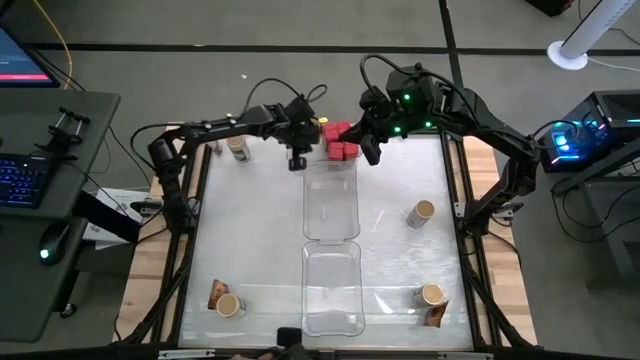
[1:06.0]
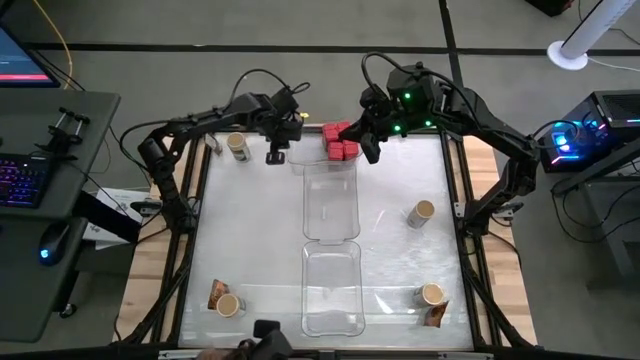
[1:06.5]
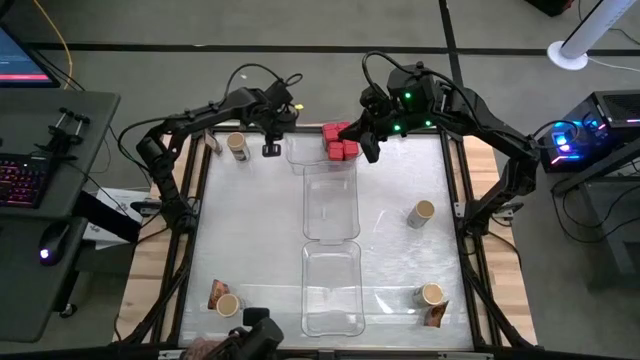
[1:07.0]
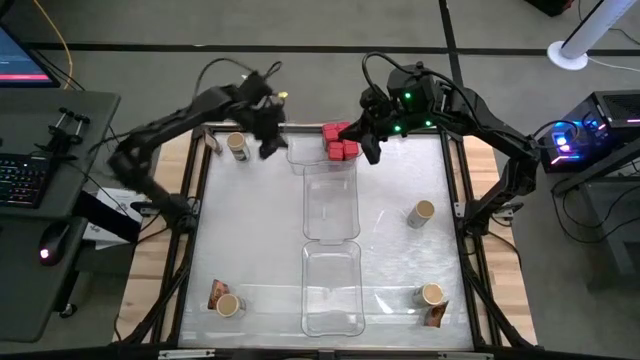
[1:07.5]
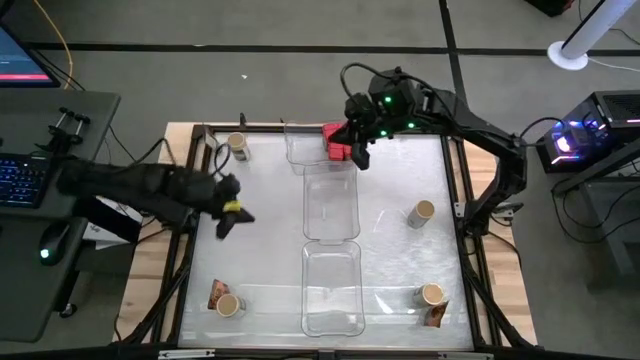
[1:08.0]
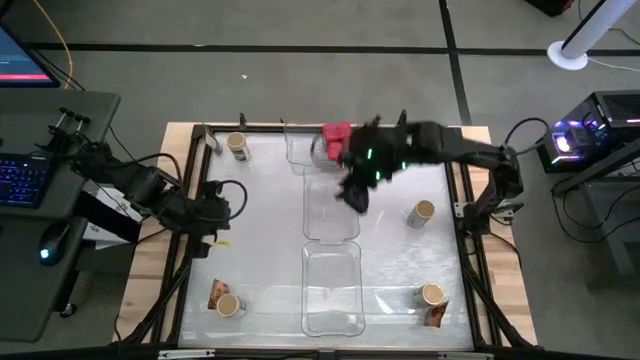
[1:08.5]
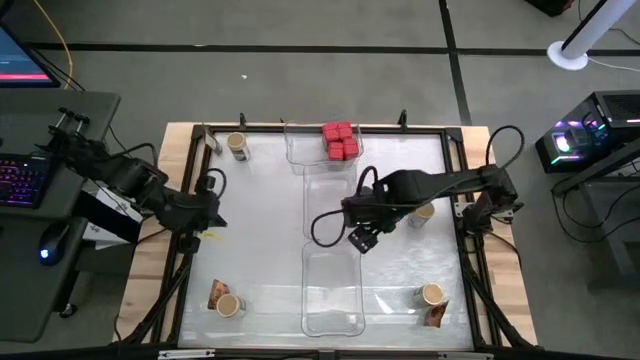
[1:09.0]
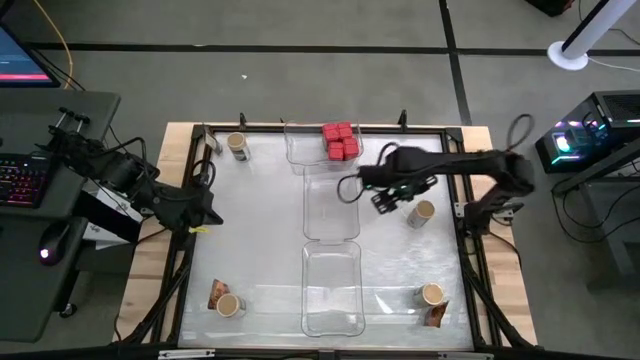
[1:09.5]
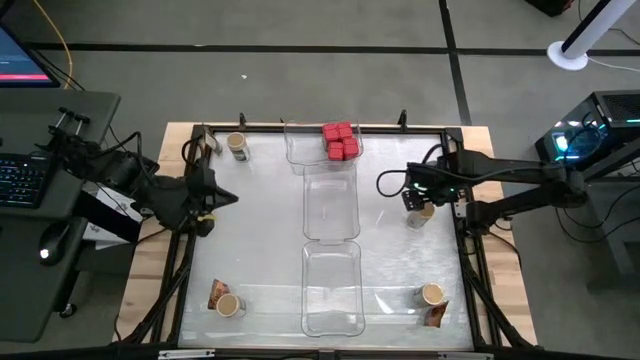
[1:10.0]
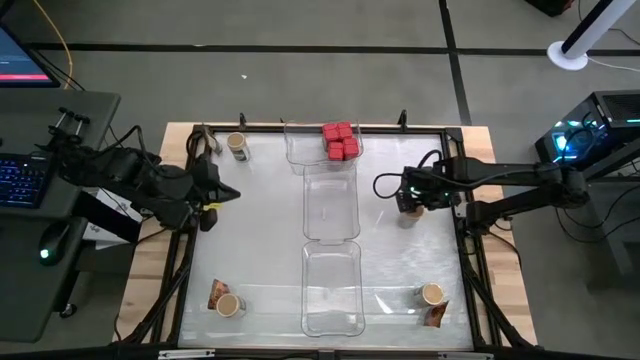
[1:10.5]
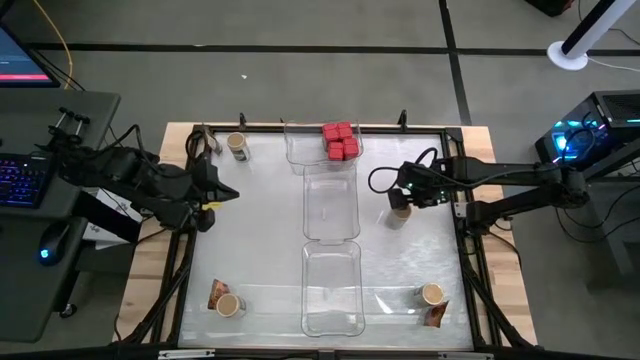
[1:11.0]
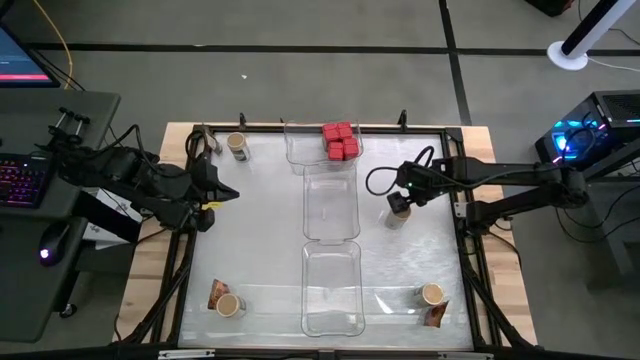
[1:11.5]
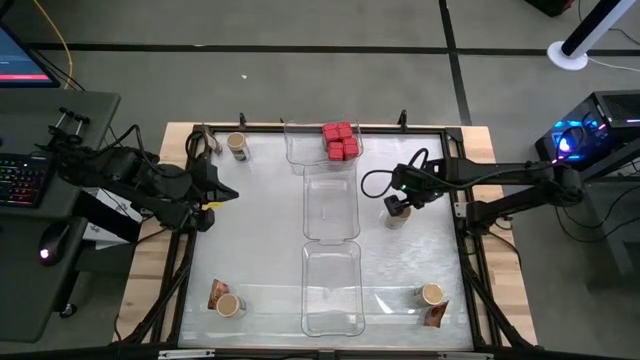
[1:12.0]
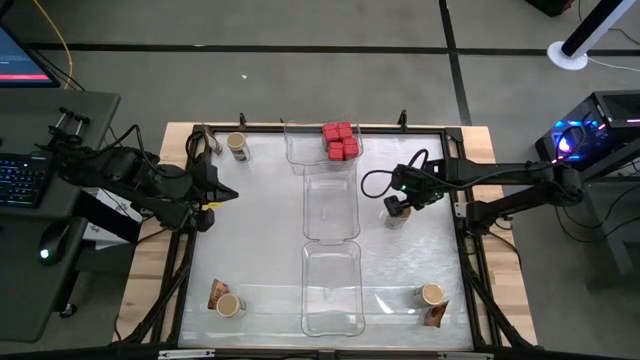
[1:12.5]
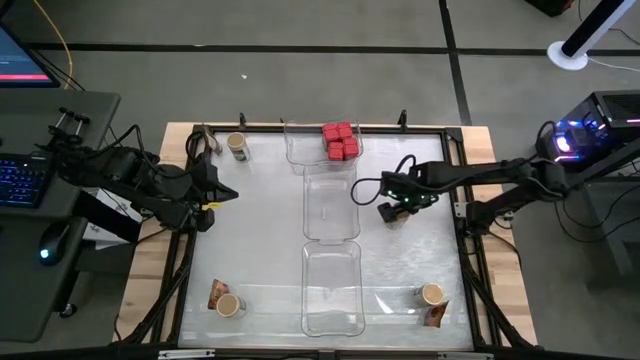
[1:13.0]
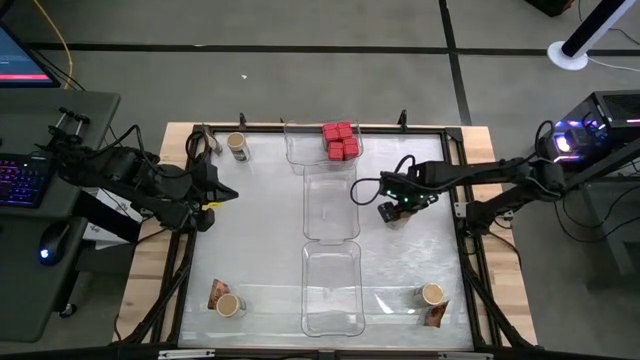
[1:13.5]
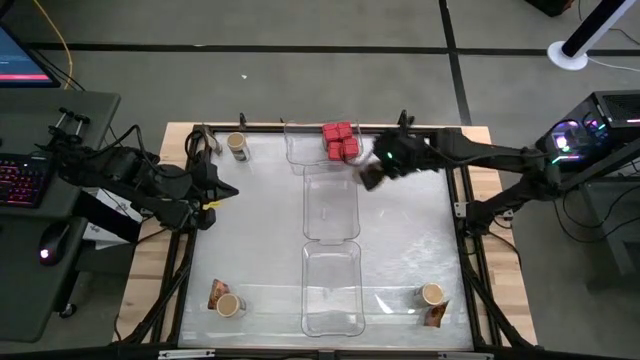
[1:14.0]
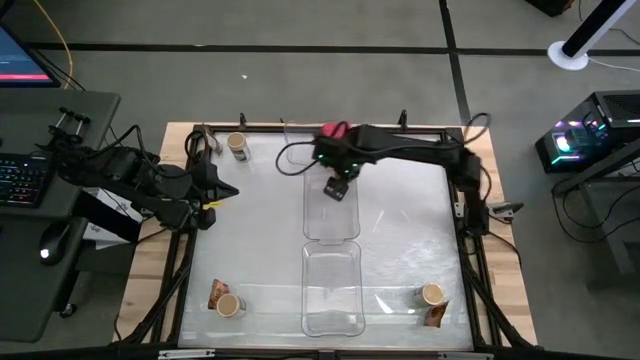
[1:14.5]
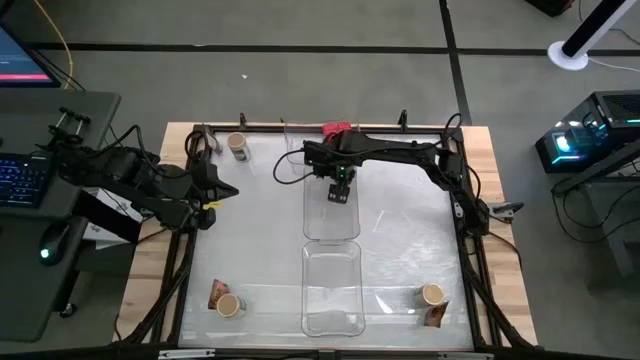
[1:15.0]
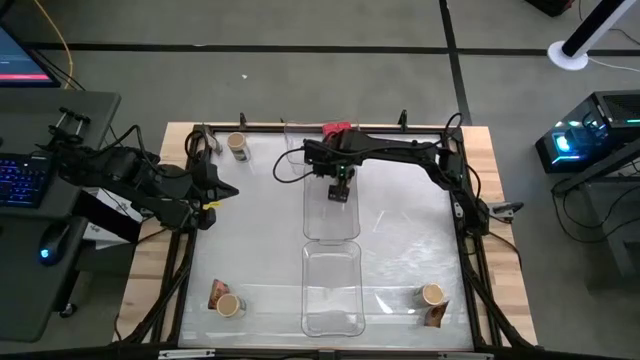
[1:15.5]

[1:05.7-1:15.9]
Task: Sort spices by type
Put the middle right gold seasoning bottle into the center transparent bin

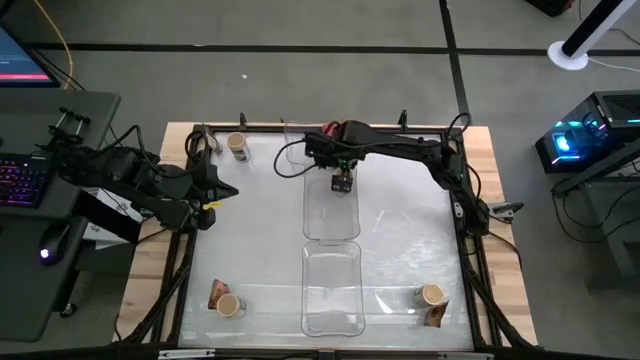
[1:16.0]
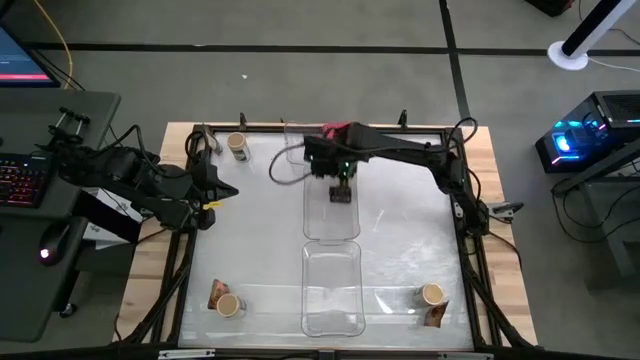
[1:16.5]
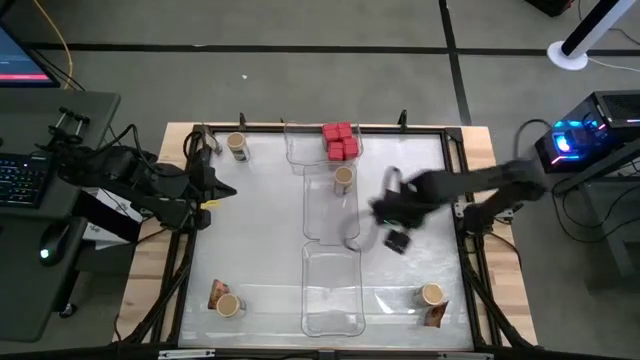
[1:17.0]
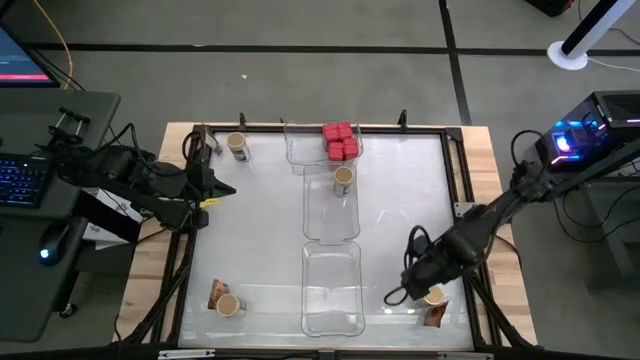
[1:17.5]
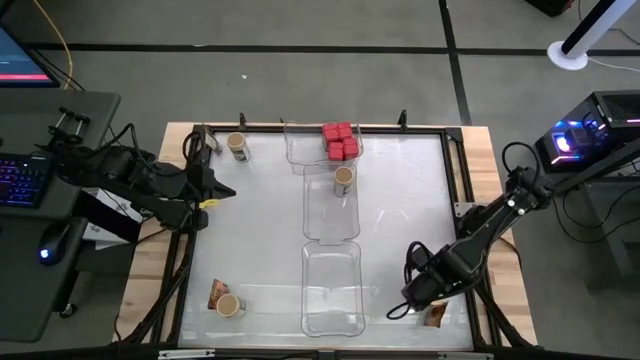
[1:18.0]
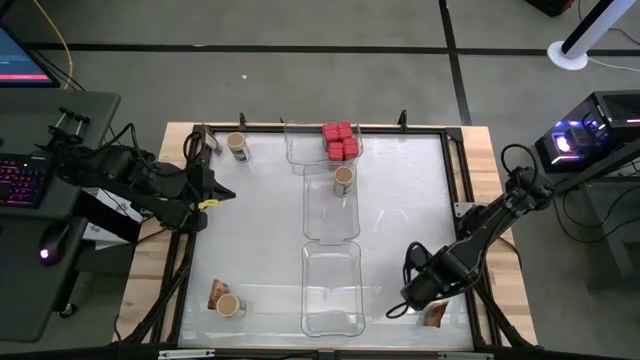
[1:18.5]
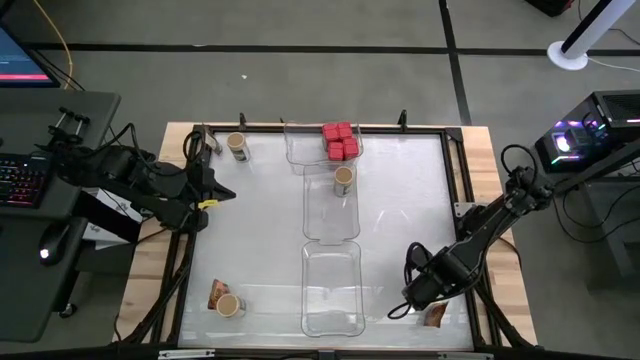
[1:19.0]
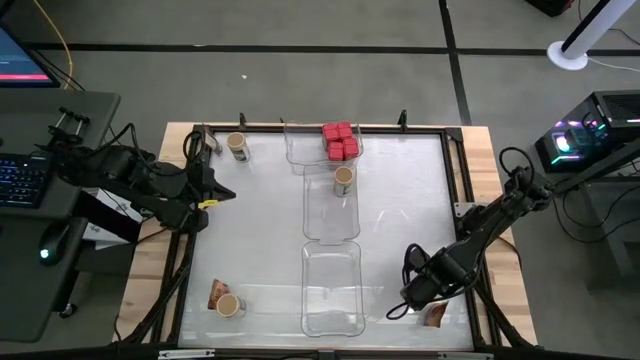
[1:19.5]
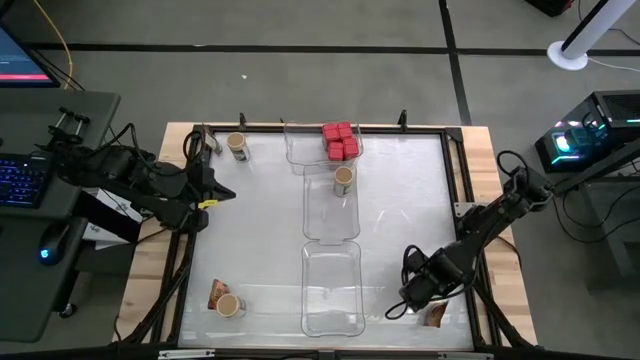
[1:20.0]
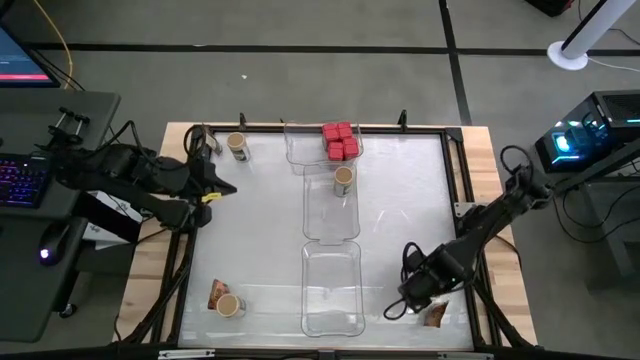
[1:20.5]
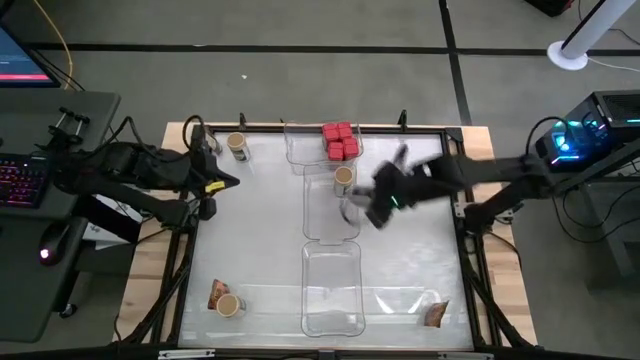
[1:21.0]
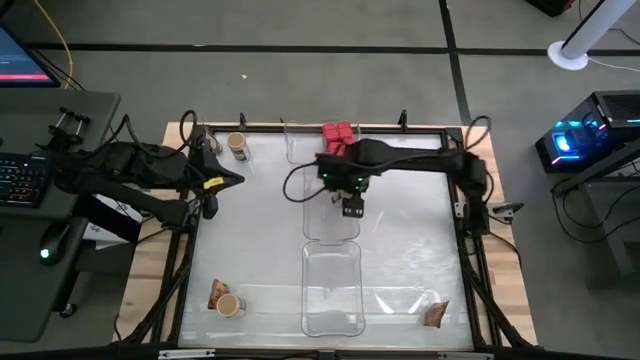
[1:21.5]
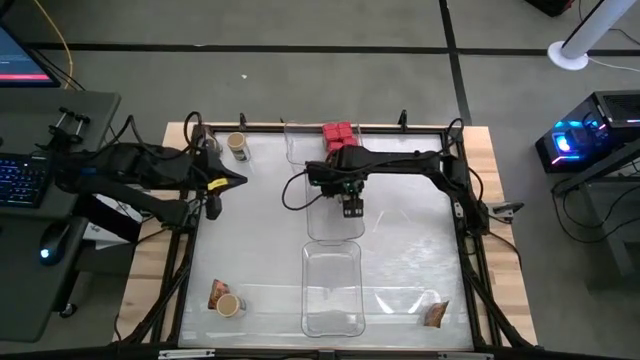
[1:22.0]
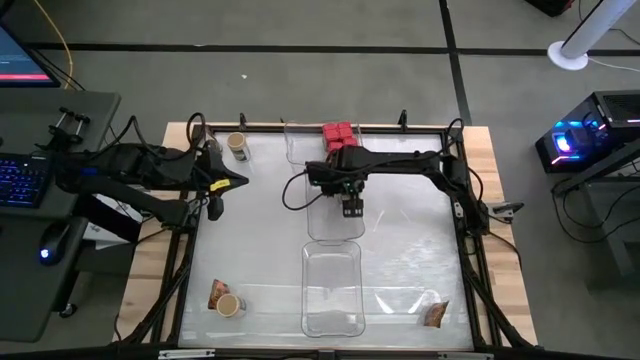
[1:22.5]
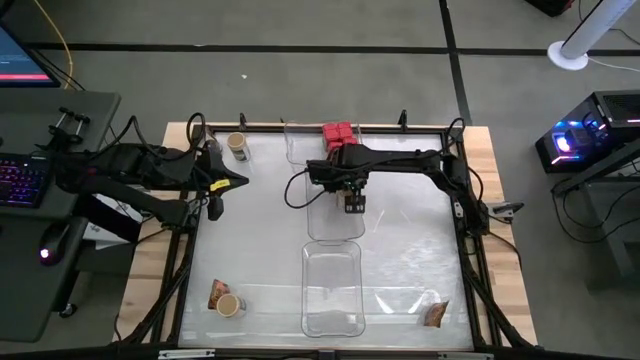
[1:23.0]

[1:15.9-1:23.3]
Put the bottom right gold seasoning bottle into the center transparent bin

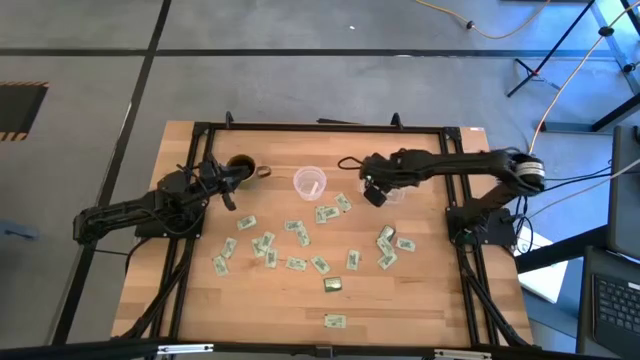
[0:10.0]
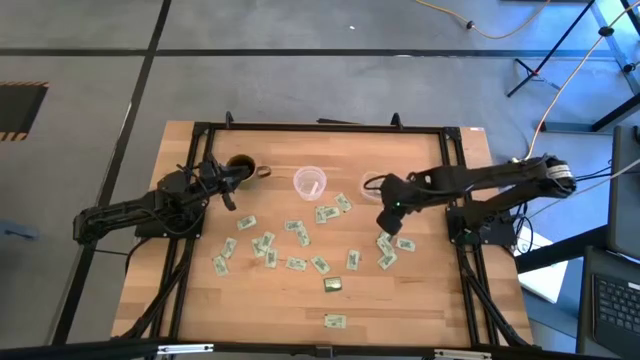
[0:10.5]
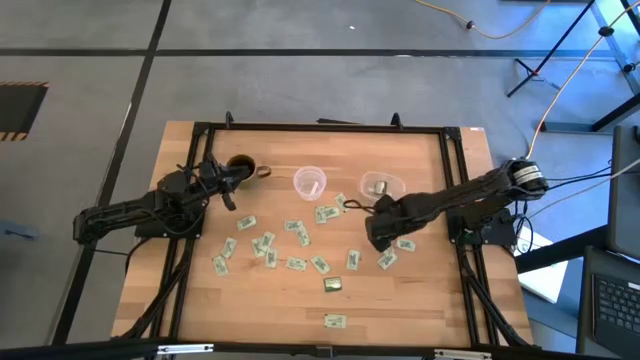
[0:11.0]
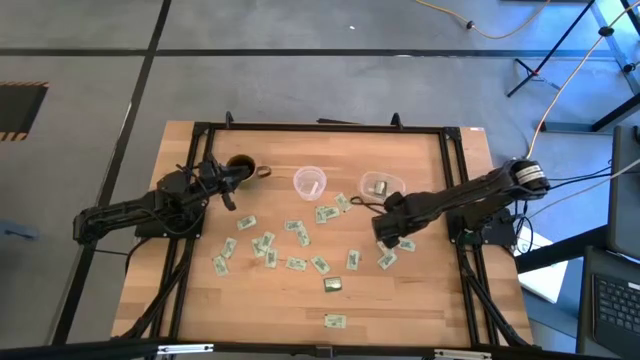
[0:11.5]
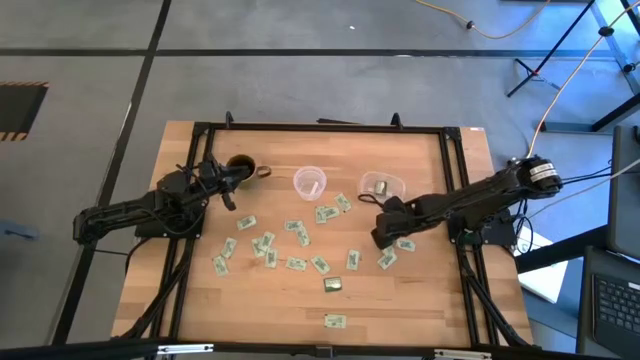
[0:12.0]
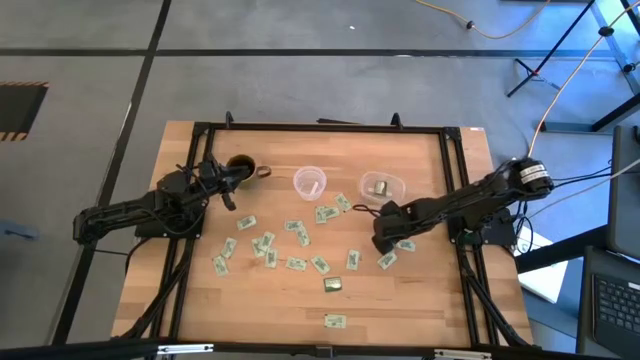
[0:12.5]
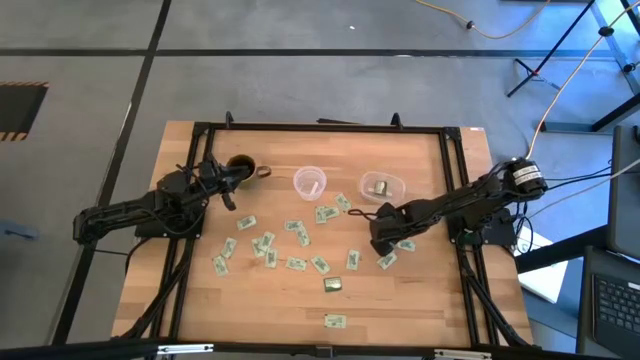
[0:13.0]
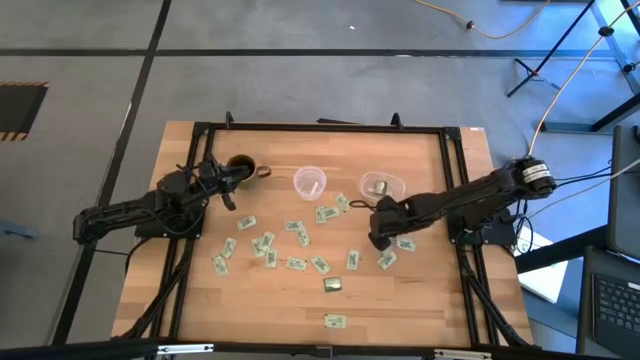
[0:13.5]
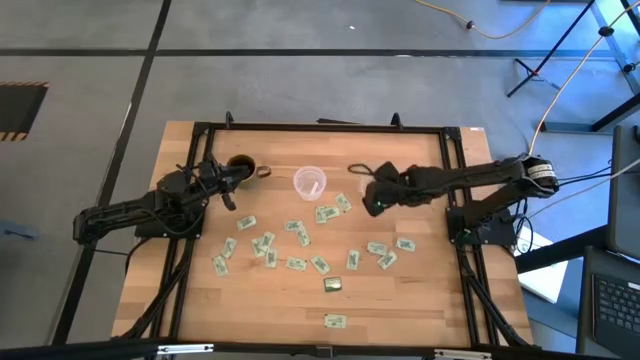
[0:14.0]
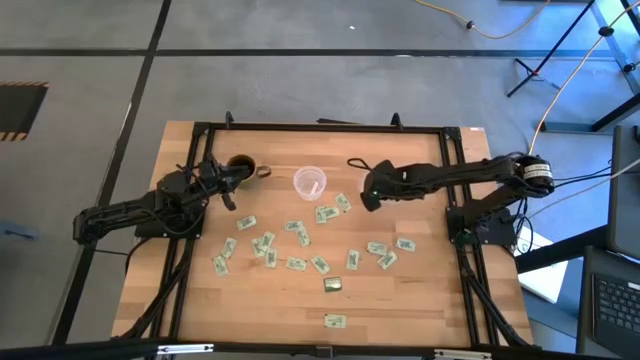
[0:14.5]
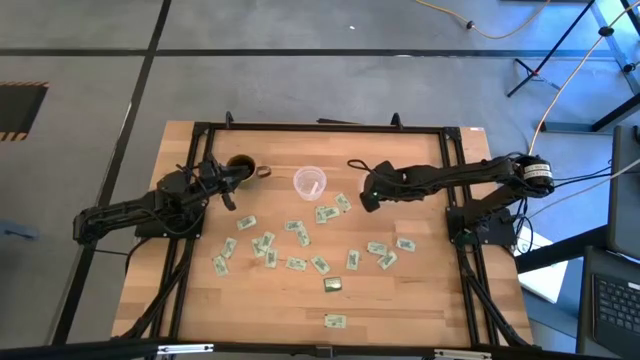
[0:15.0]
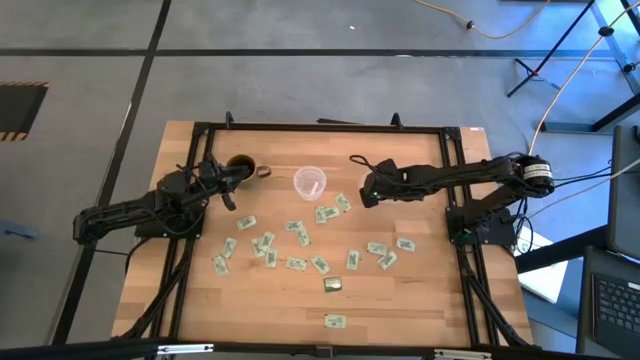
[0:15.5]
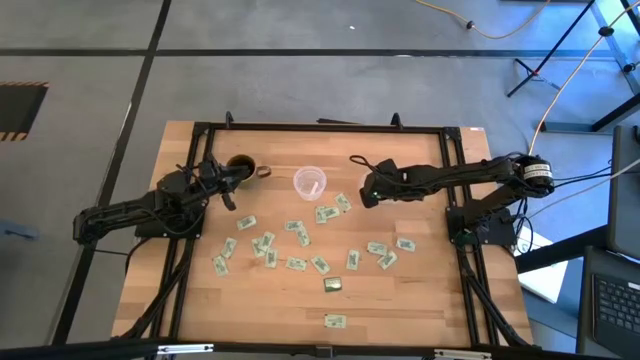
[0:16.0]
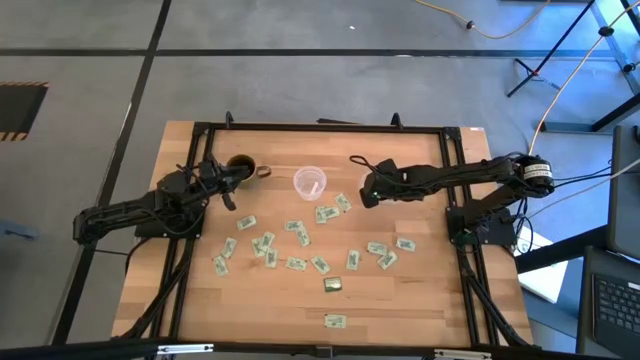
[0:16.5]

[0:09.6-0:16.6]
Task: Pick and place items into bin
Put the green stevia packet into the right transparent bin
